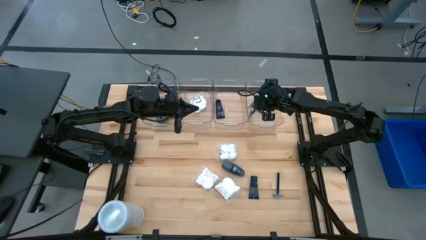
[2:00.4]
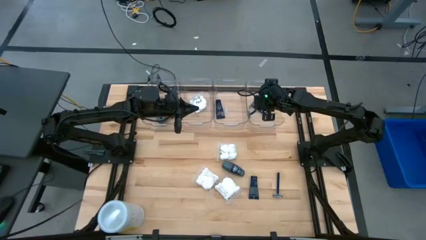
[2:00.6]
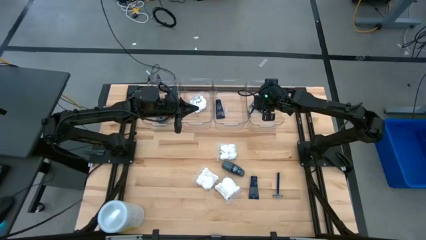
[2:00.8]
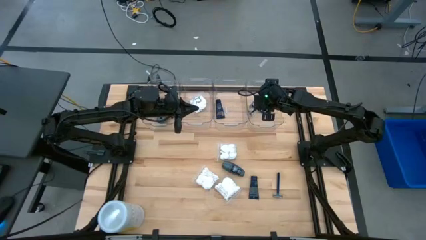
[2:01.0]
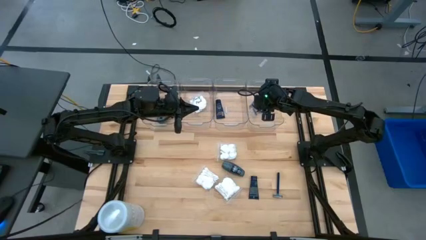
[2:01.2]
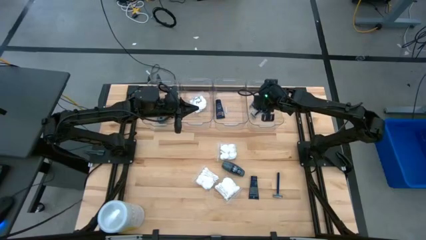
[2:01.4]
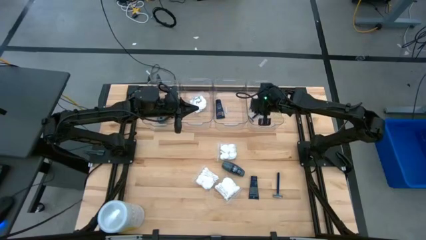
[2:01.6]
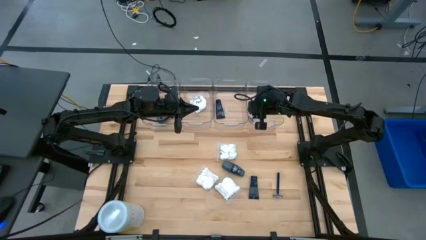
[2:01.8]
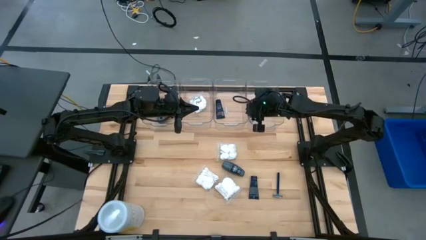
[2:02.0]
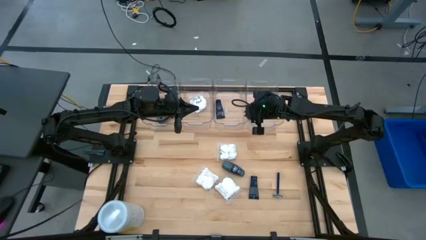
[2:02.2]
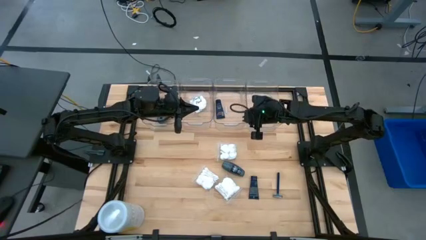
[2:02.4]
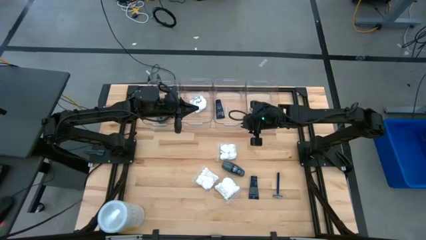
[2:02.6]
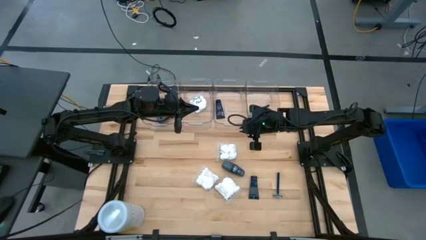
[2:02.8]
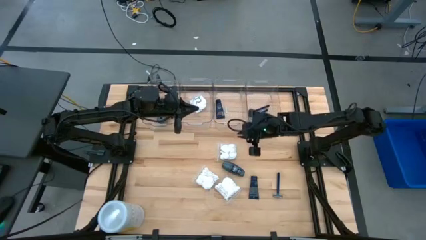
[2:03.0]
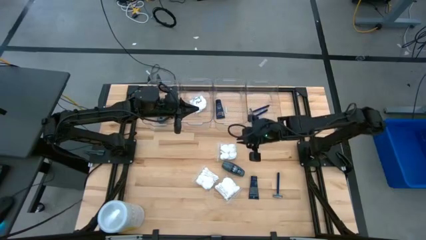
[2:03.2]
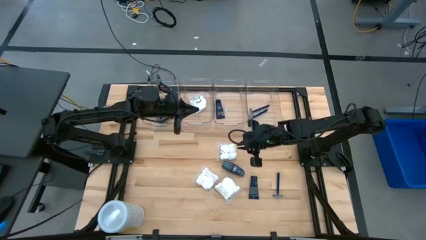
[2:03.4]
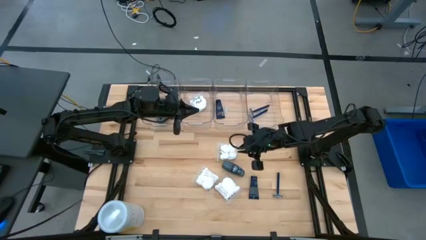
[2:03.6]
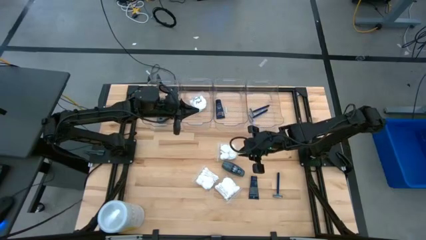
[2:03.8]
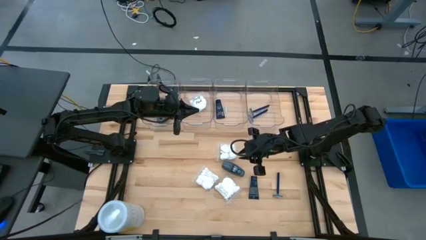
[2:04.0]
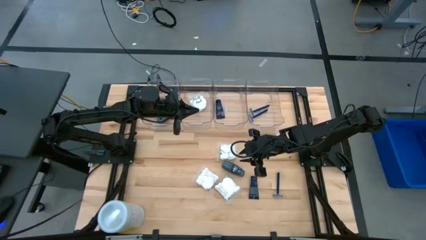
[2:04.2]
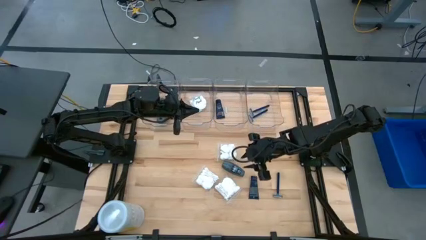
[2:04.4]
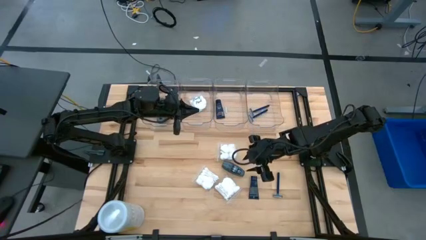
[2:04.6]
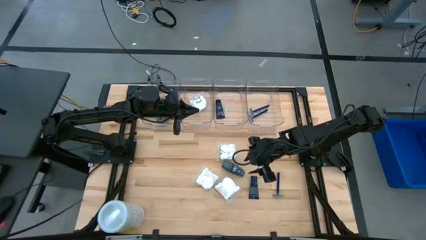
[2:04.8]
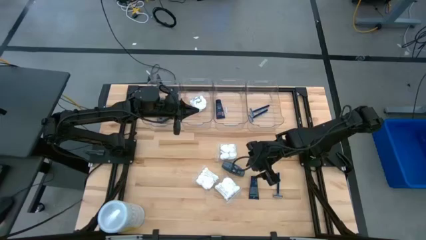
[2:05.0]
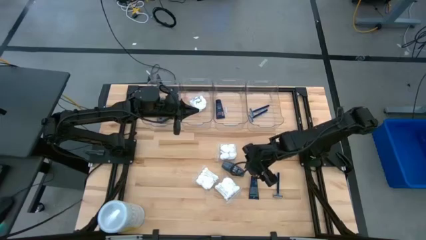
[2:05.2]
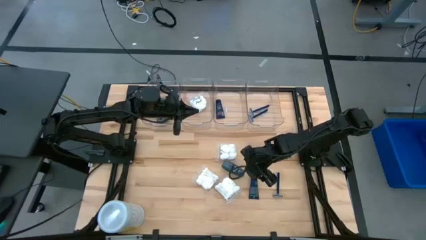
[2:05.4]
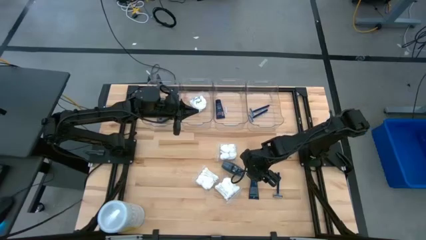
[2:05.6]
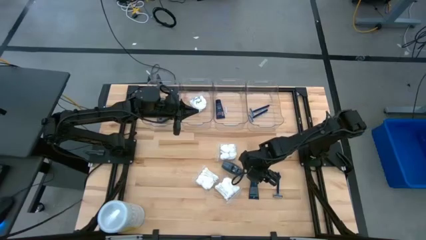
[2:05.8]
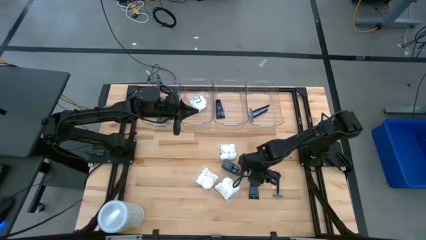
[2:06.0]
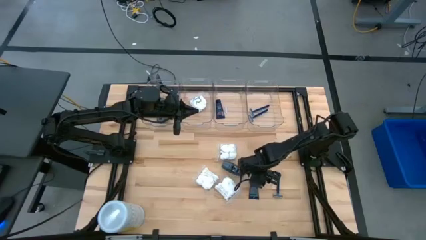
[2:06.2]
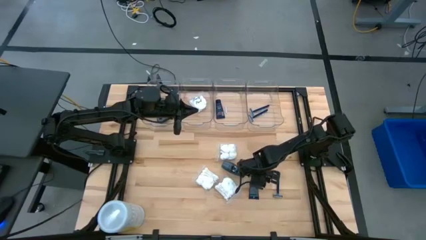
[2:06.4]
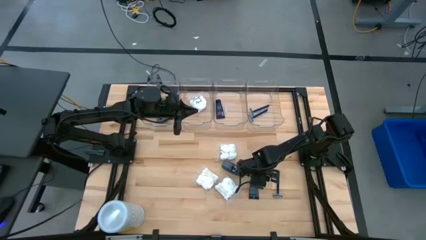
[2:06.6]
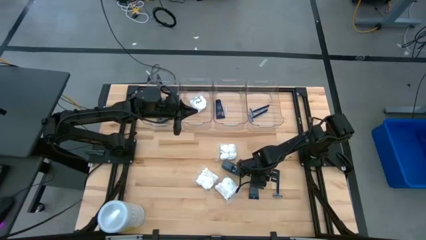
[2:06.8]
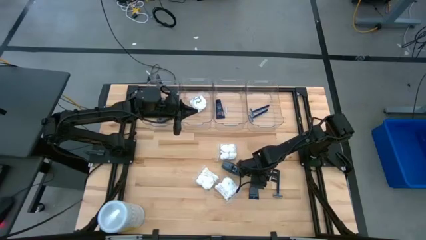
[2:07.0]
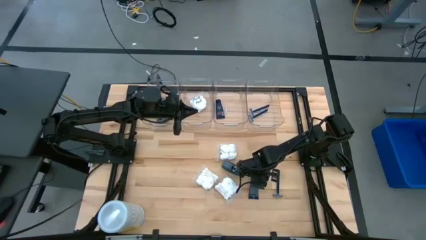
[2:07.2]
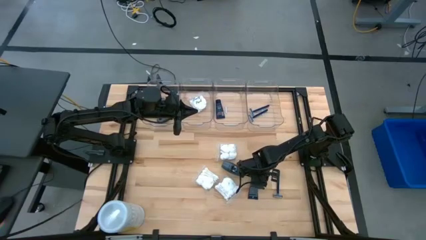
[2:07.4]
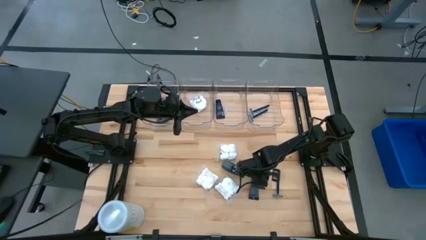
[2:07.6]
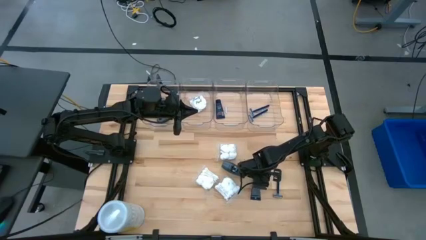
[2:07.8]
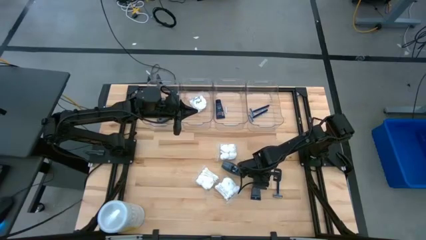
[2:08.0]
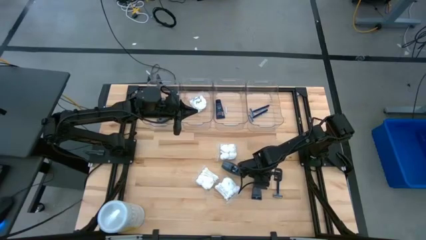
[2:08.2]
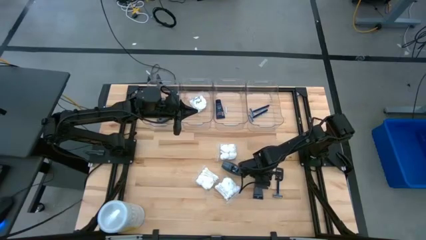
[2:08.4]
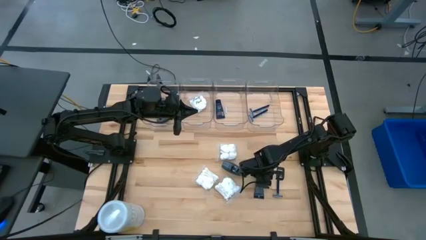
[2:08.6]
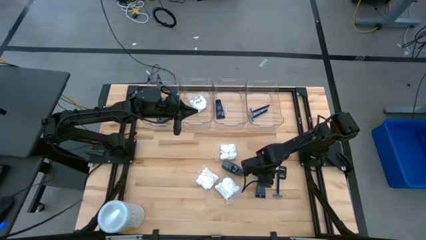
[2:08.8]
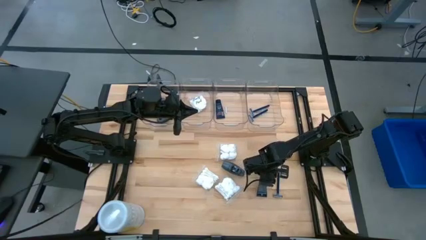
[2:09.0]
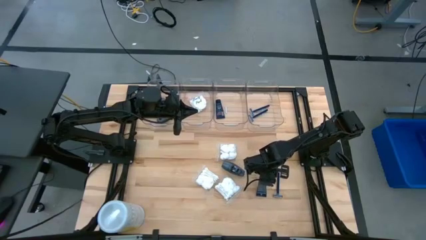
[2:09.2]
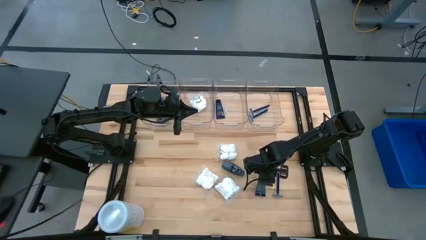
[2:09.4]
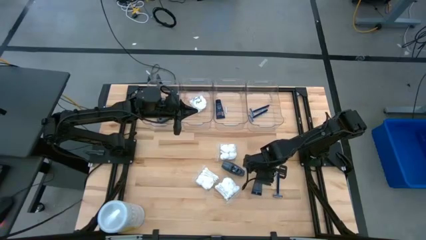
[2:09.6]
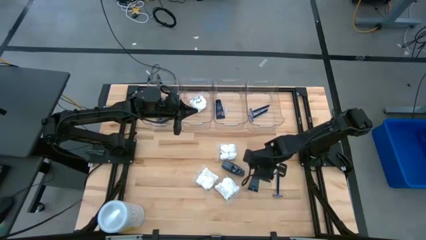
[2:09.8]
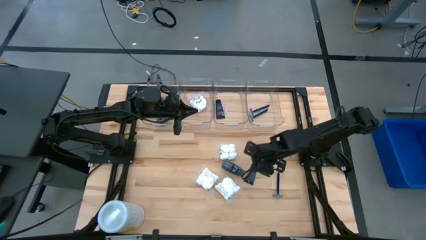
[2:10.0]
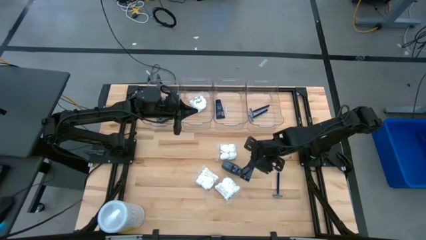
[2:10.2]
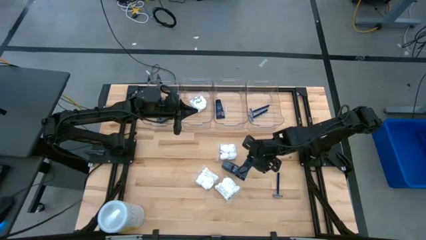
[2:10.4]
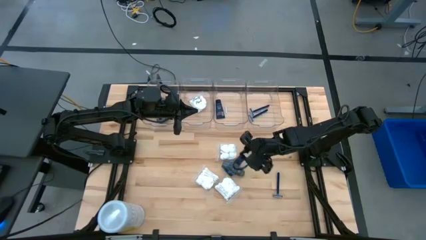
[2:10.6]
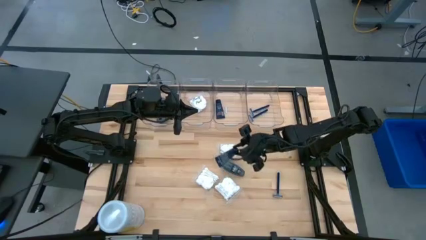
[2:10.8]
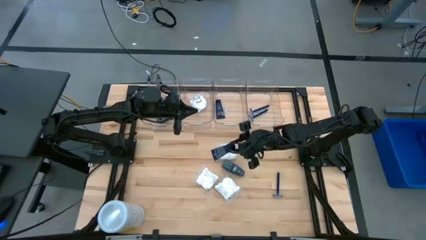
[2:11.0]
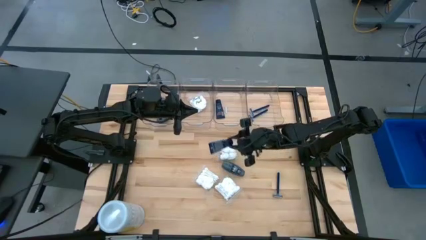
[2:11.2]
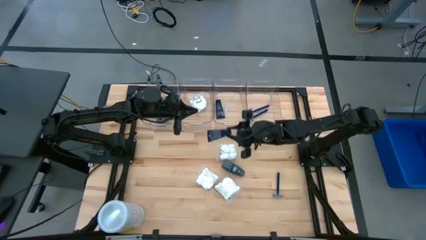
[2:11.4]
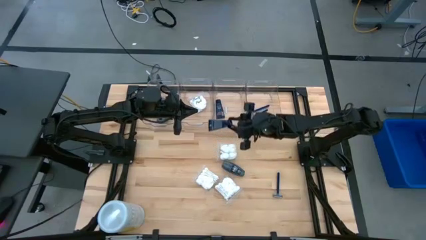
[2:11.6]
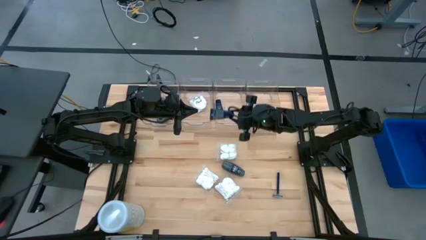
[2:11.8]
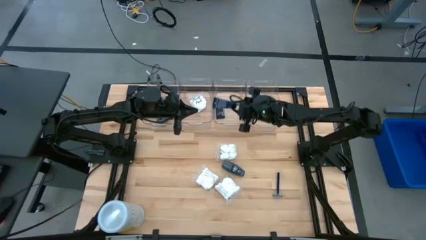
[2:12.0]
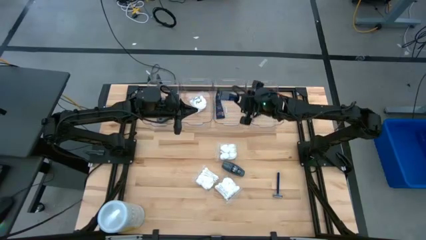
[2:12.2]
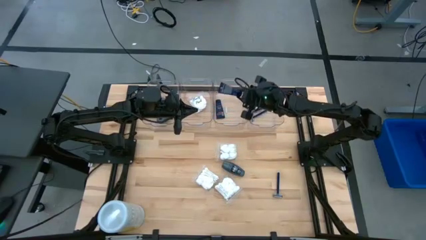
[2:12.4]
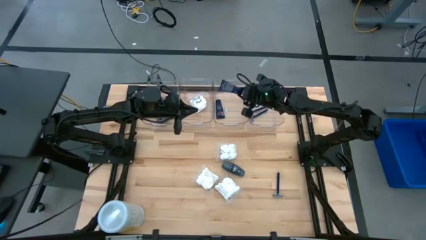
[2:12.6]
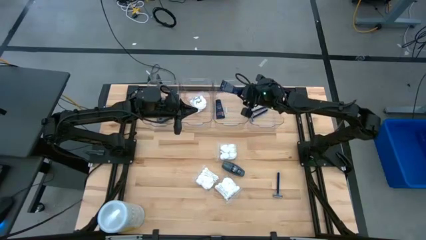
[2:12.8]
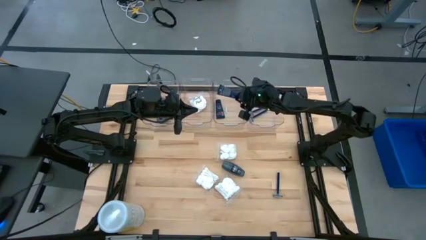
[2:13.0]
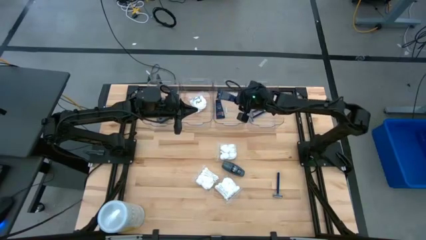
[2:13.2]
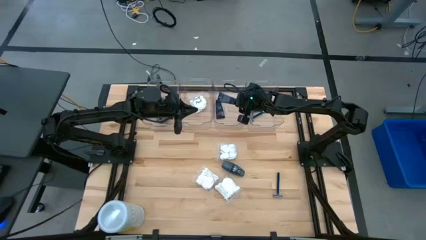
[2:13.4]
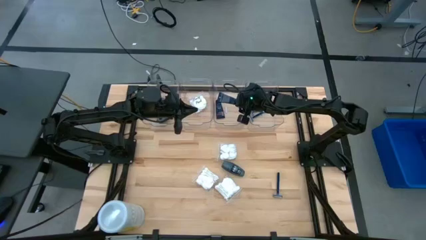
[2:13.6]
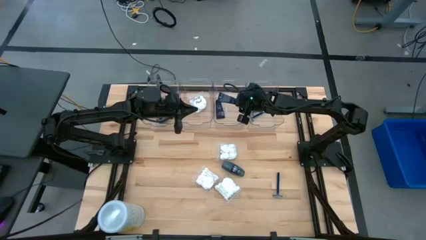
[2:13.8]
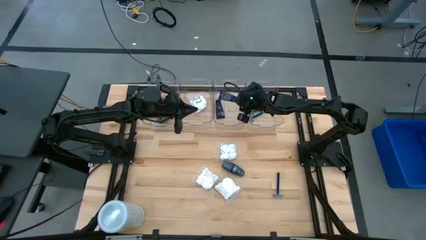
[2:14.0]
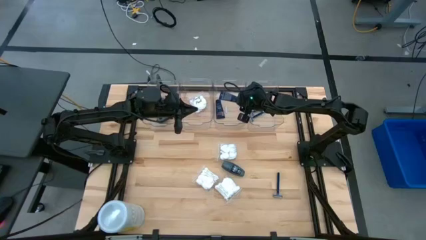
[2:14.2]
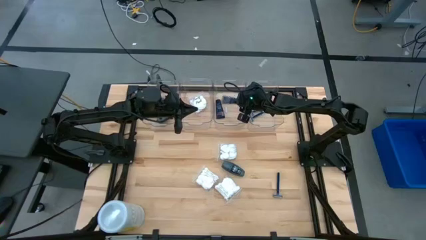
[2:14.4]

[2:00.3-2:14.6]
Task: Pick & Place Travel size toiletries
Put the blue shave cream into the middle right transparent bin

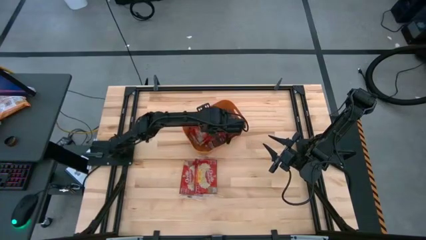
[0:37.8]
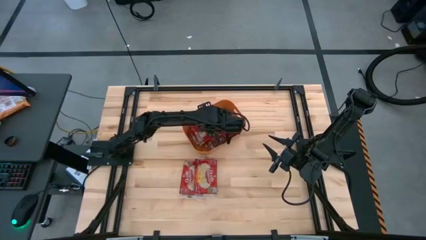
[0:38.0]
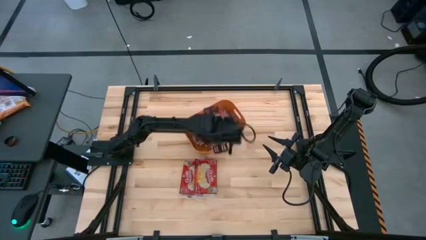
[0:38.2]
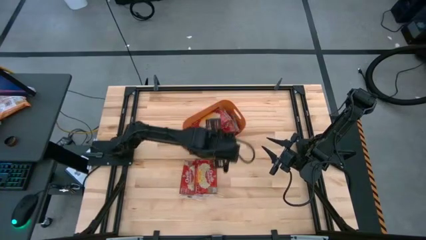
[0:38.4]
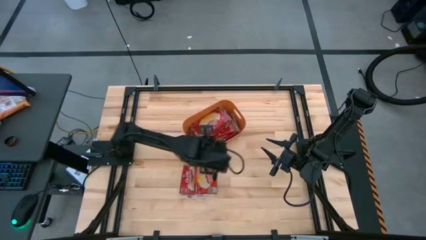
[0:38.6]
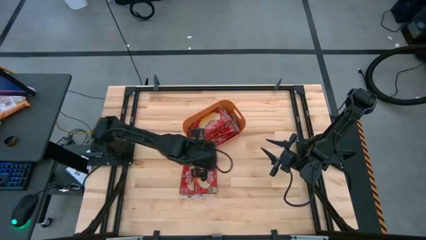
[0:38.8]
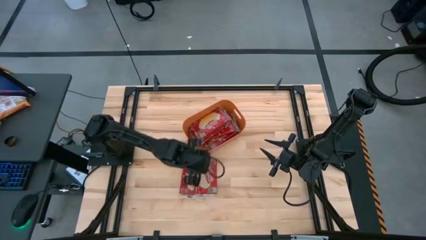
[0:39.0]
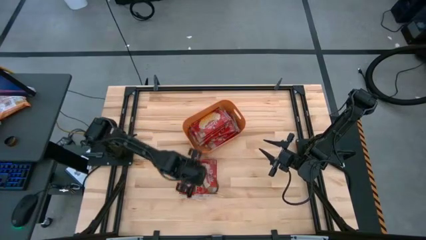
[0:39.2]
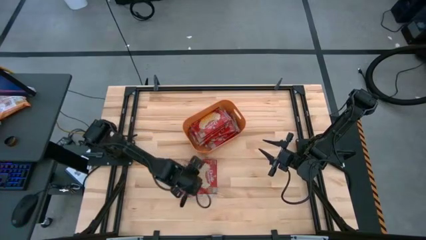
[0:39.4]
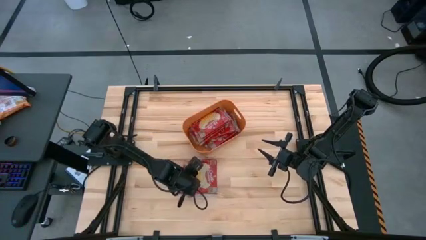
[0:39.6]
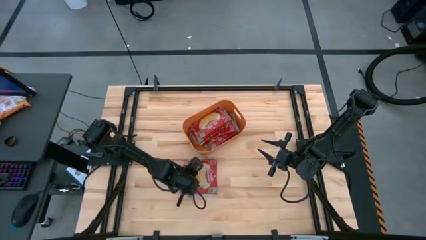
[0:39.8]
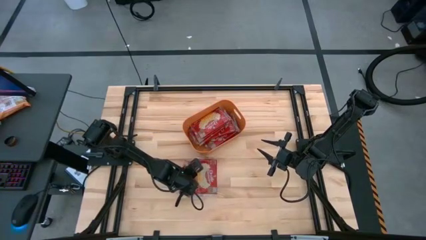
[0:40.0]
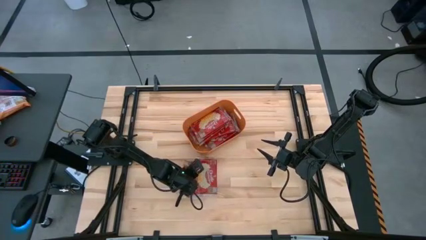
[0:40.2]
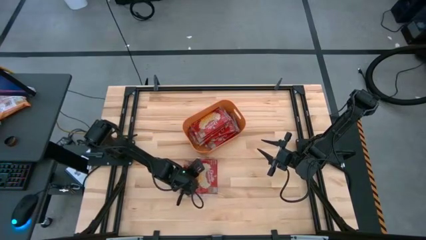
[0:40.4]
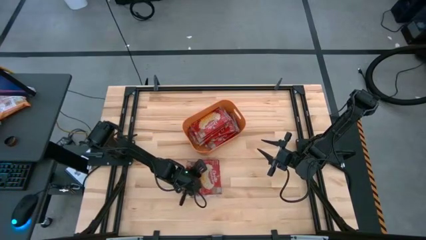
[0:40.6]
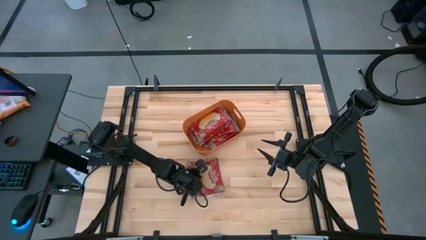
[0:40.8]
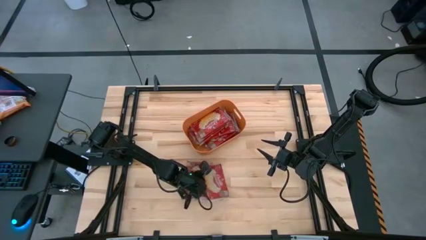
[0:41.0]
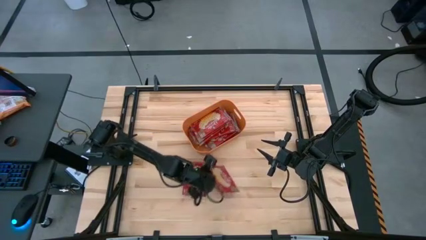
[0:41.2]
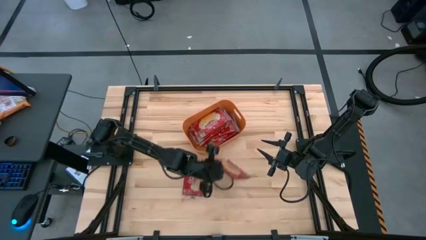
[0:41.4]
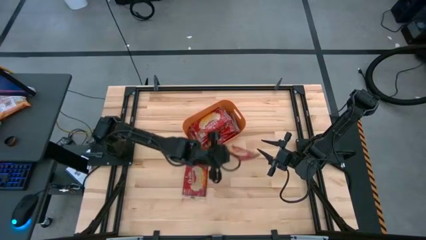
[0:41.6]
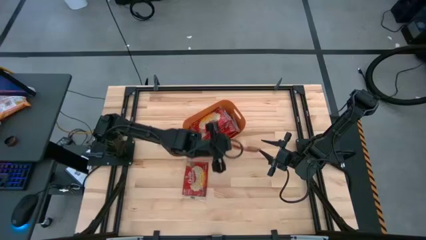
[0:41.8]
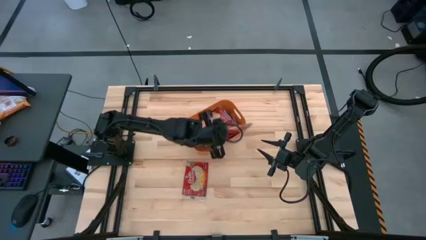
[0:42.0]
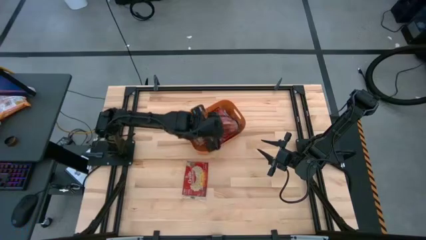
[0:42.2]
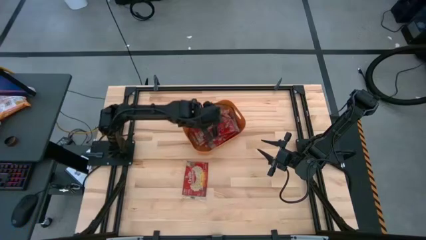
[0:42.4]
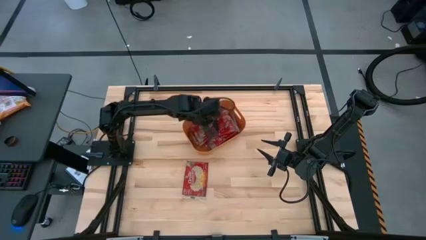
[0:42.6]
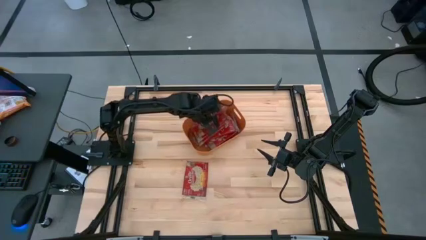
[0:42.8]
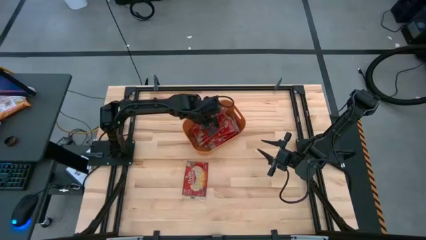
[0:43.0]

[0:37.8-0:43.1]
Task: Sort popcorn bags into baskets
Put the pop corn bag into the orange bin
